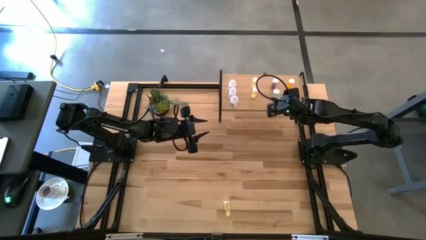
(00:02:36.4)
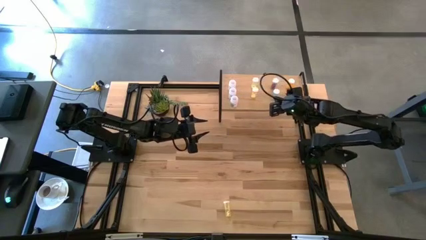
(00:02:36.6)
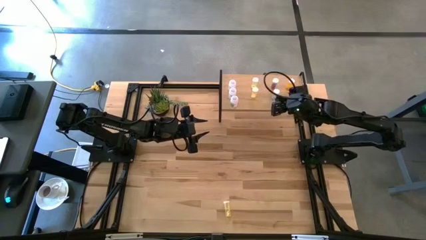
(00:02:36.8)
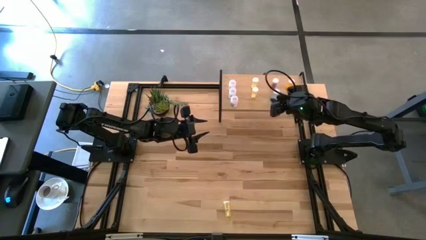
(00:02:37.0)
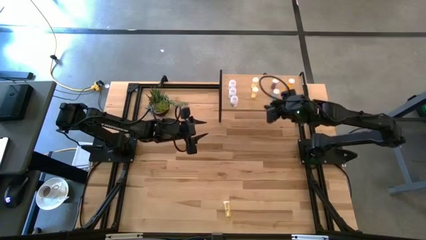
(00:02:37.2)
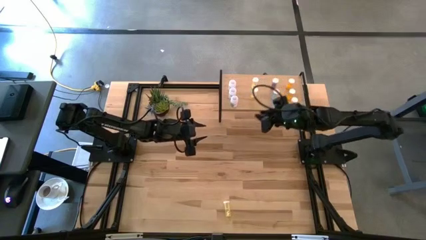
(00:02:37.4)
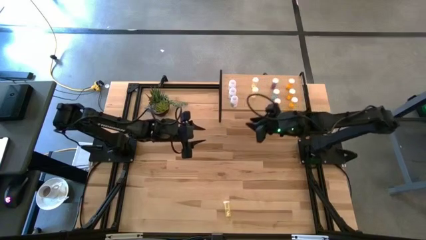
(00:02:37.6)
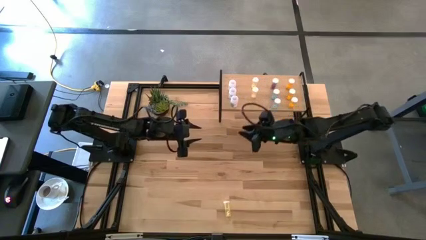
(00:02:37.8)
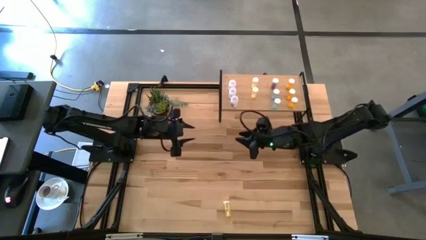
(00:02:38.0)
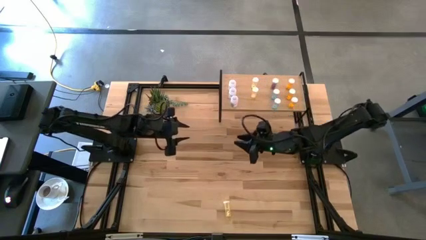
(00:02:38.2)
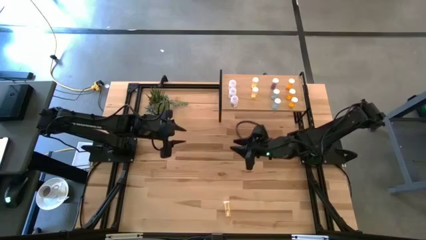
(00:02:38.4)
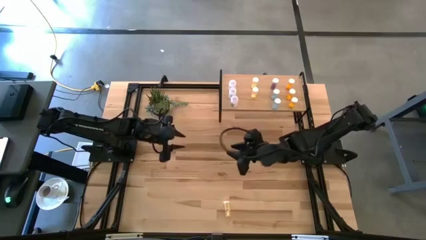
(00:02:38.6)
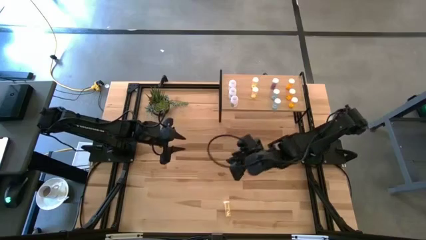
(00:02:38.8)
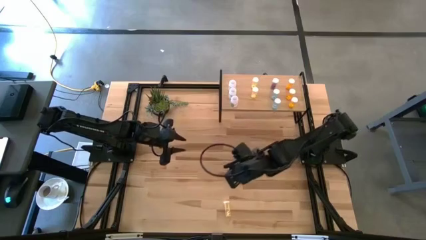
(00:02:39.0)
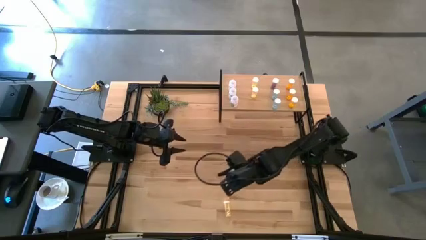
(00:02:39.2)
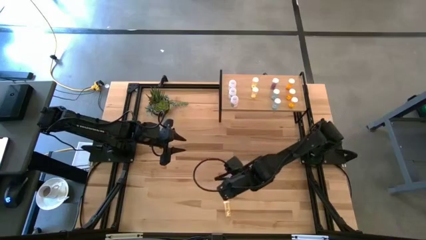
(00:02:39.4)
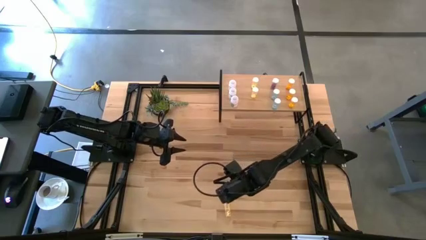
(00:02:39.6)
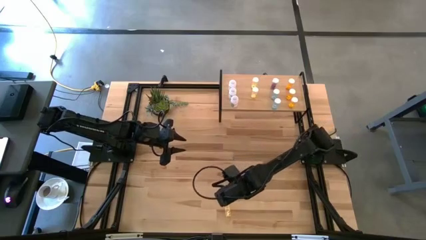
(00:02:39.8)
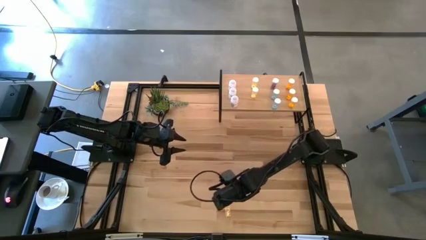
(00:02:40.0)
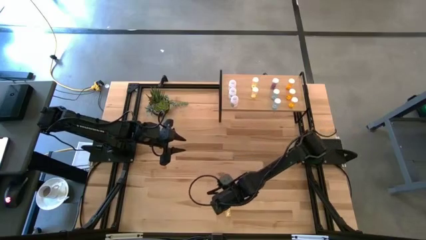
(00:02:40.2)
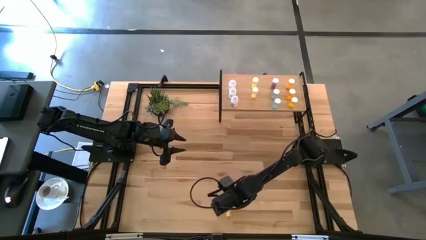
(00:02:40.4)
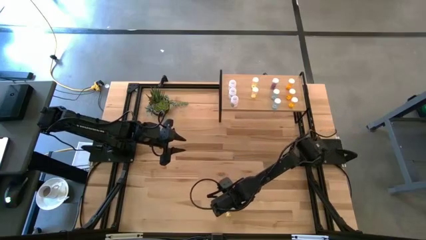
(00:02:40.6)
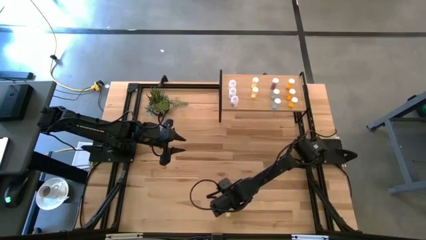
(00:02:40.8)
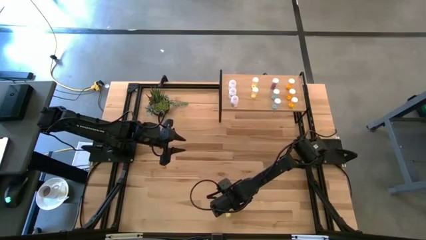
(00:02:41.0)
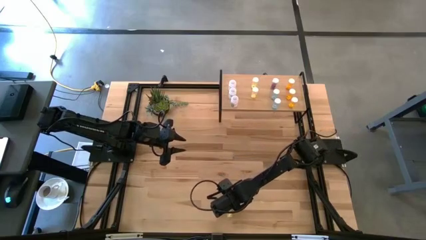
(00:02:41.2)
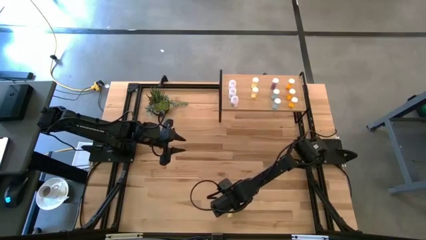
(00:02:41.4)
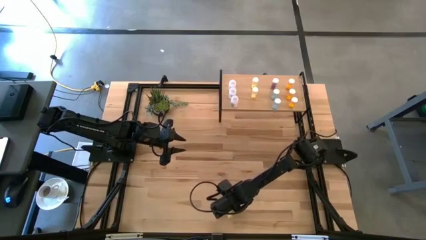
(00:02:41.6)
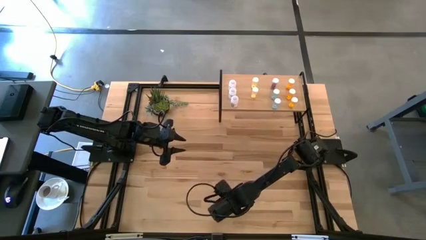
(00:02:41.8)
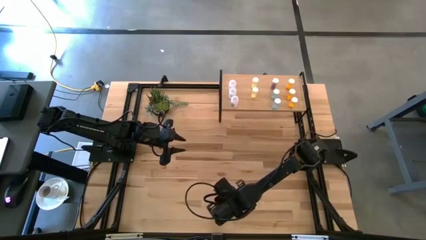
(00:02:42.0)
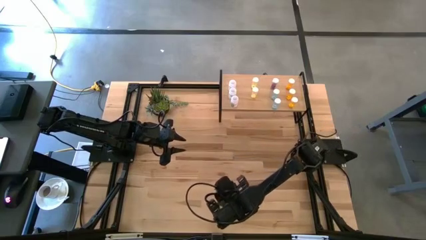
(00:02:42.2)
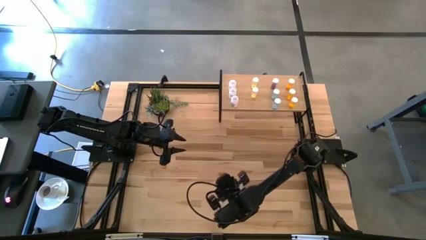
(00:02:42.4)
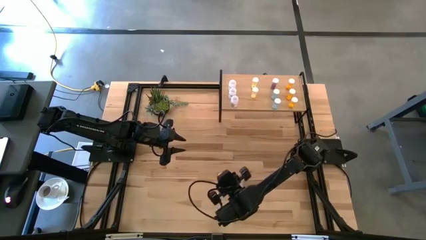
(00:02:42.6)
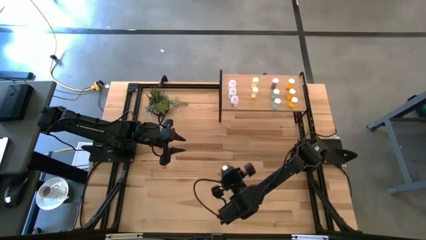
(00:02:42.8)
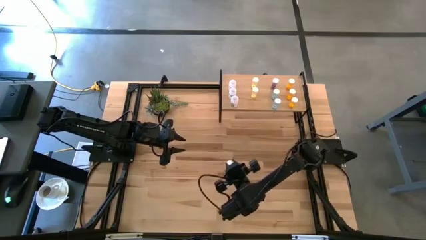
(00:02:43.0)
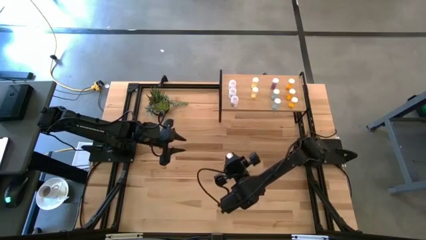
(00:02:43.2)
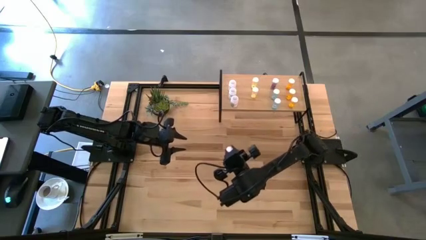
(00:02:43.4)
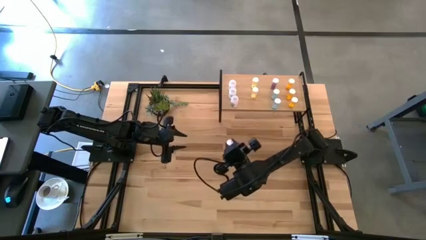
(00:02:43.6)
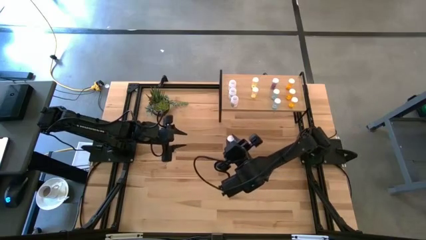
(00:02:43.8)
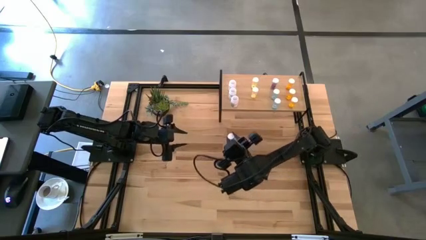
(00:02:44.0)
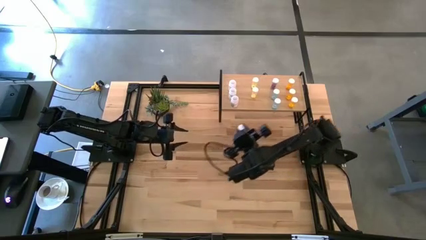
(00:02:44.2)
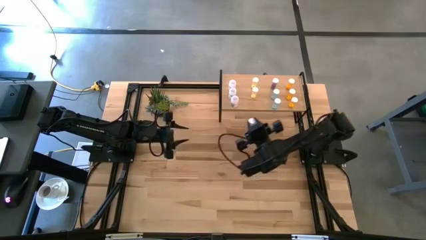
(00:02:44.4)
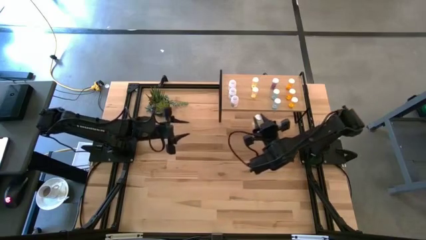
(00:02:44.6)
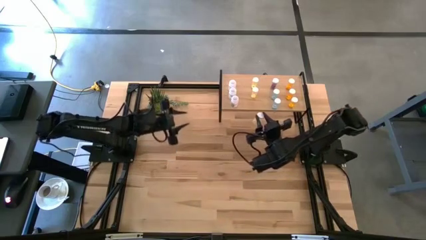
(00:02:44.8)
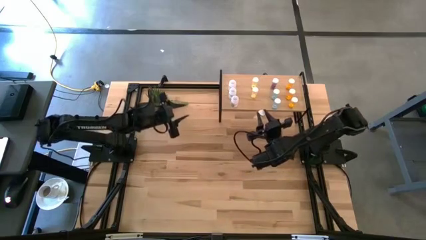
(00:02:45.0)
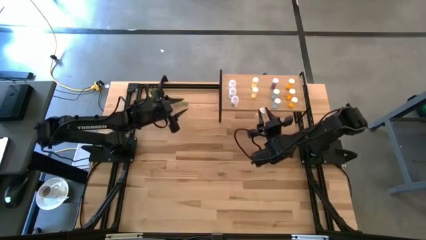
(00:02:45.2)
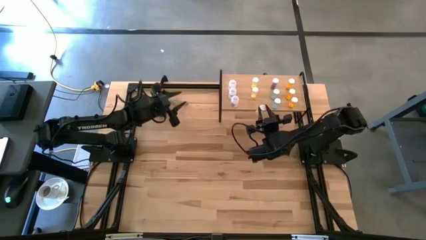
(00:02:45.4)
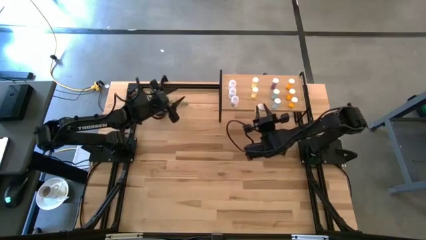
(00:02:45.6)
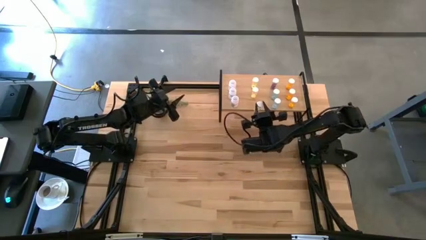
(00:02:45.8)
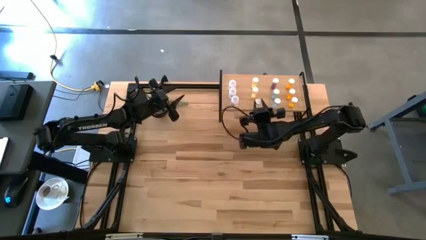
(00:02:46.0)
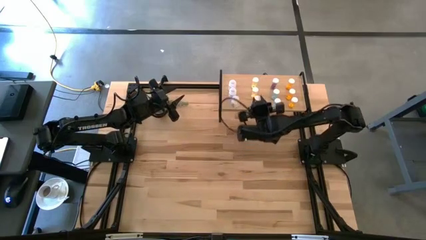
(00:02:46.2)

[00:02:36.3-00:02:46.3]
Task: Pick and place medicine bottles onto shelf by color
Put the yellow pill bottle aligned with the other yellow pill bottles on the shelf

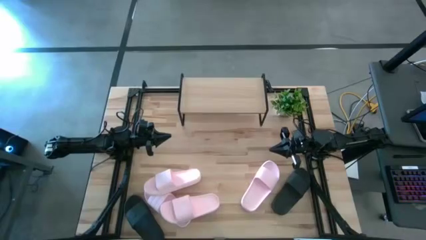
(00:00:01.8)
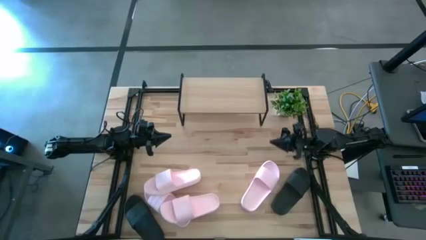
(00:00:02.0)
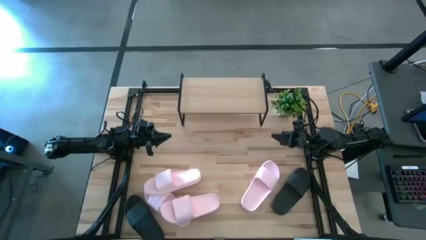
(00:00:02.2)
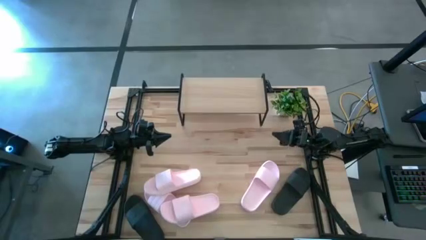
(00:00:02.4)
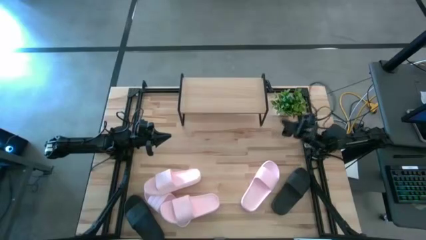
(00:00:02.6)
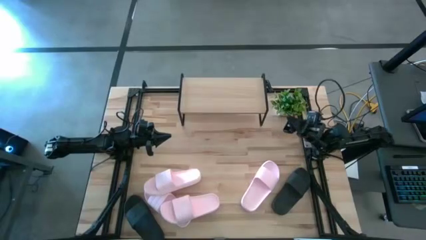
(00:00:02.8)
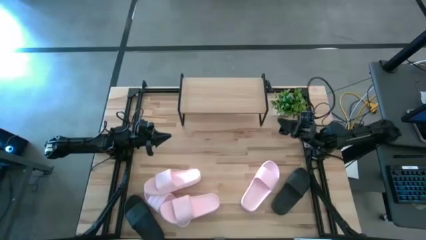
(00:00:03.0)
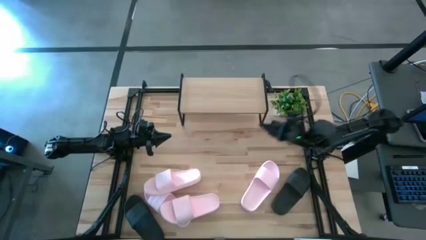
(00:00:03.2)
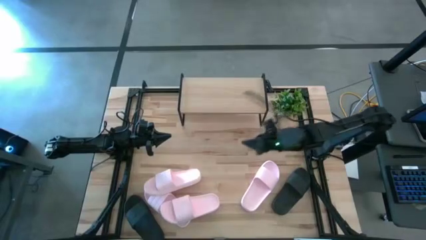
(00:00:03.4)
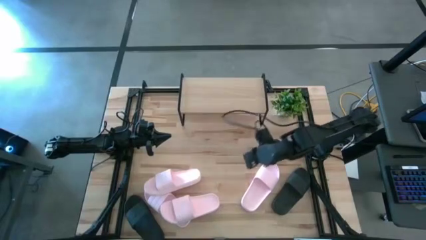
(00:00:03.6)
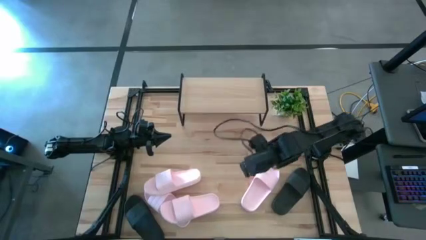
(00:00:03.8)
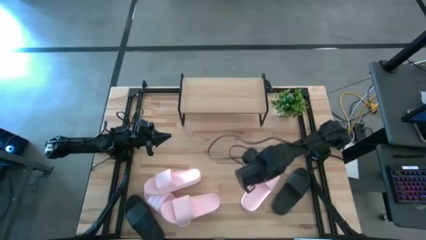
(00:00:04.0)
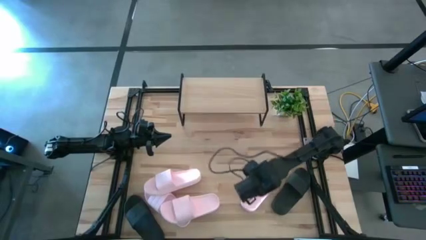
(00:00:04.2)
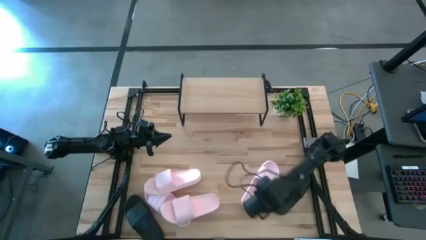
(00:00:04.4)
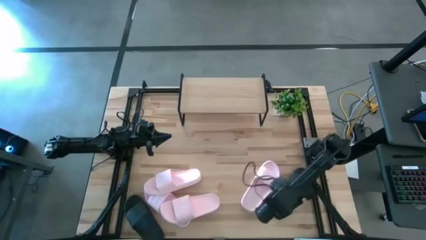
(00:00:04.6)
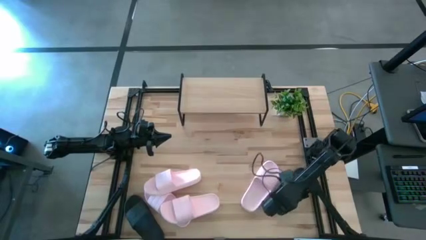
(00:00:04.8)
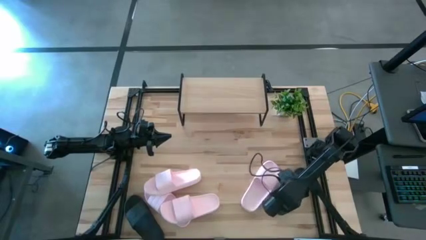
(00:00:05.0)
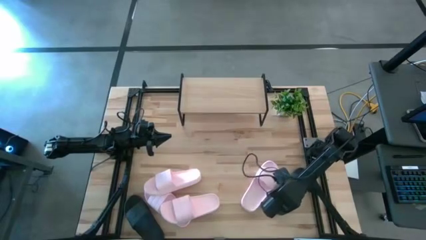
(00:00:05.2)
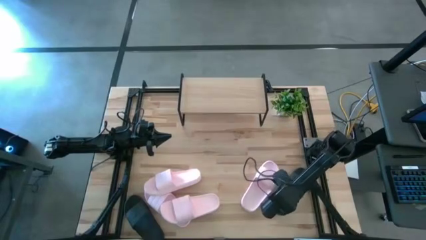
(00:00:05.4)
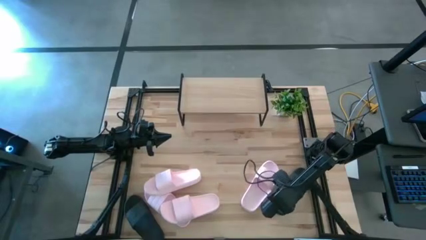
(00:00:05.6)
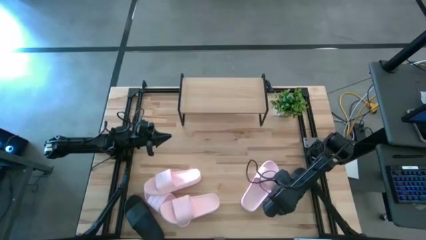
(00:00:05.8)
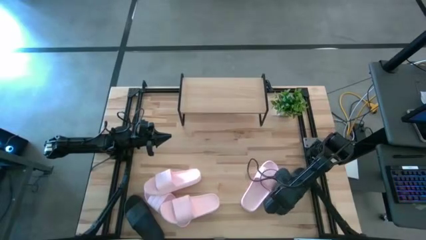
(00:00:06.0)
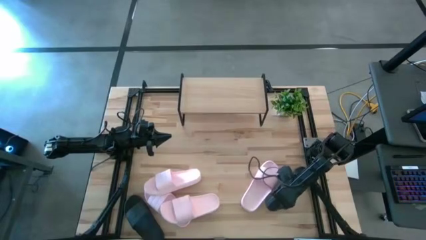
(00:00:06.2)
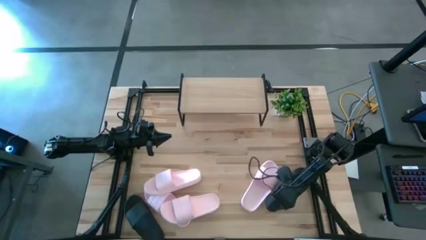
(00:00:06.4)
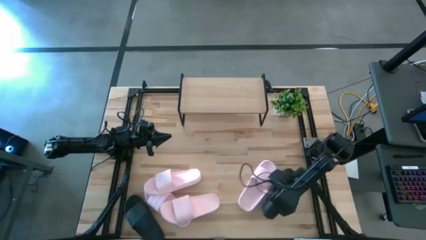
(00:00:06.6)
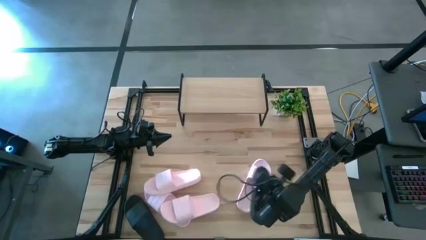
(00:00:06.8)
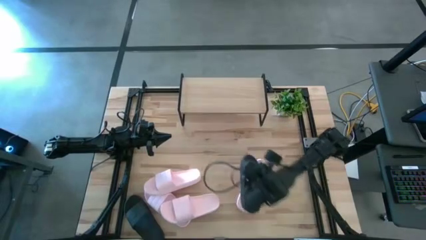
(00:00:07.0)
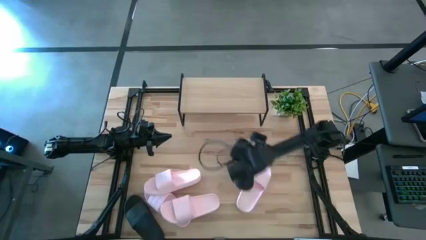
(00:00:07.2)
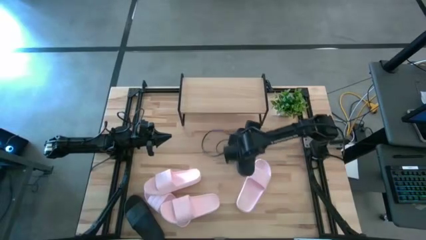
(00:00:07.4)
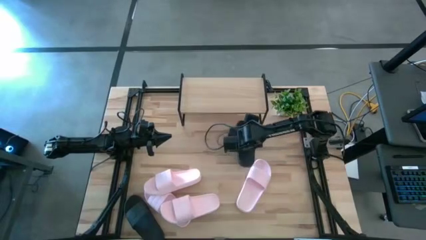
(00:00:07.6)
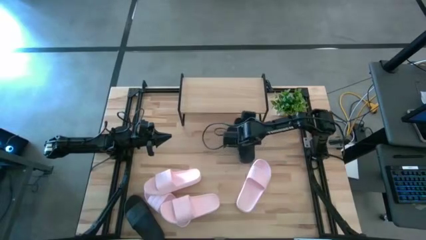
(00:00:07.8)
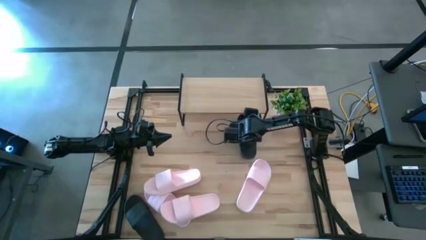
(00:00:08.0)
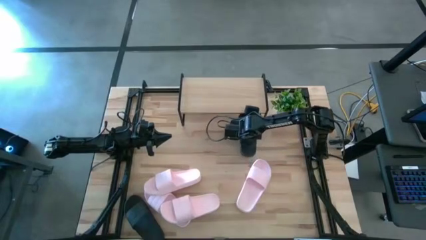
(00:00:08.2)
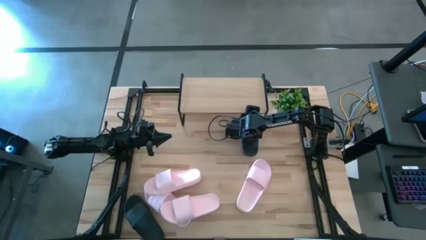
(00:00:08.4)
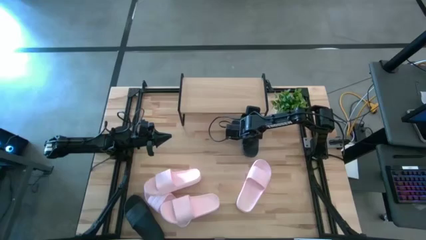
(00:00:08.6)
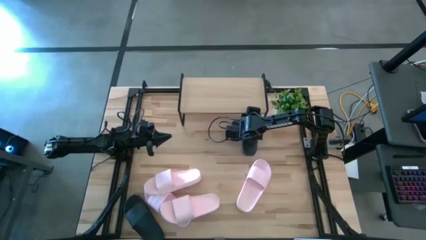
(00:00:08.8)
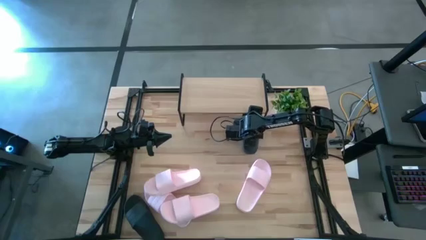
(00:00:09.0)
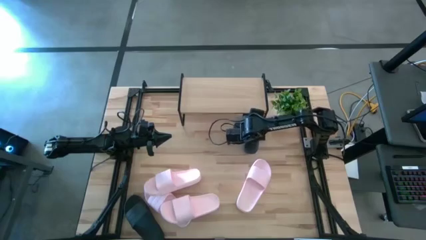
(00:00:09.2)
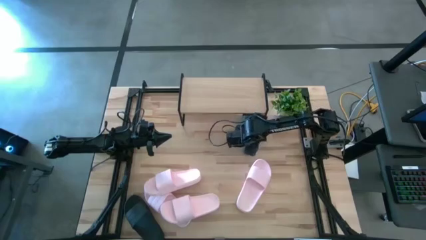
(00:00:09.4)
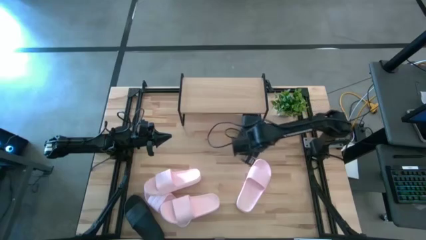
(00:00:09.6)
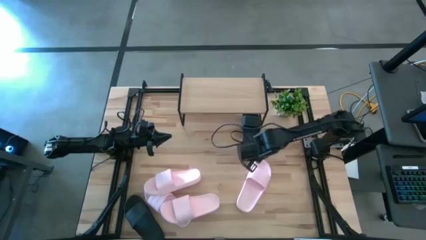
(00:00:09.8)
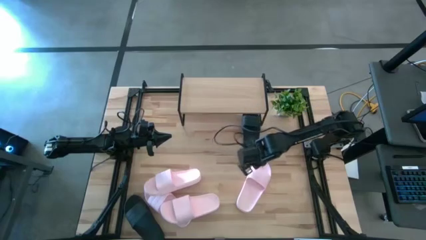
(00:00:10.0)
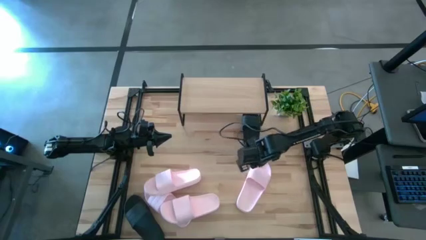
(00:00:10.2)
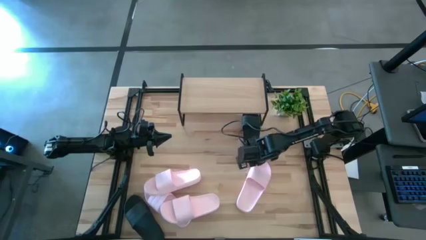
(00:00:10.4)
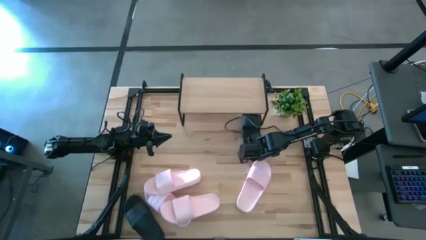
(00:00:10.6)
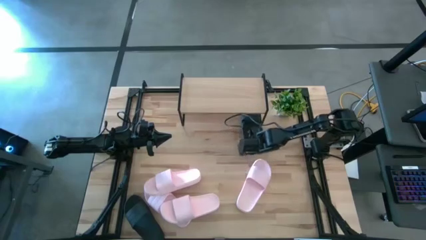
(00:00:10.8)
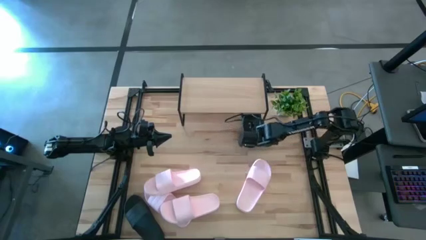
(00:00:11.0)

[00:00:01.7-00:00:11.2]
Task: Pick and place slides into the shelf
Put the black slipper under the shelf
